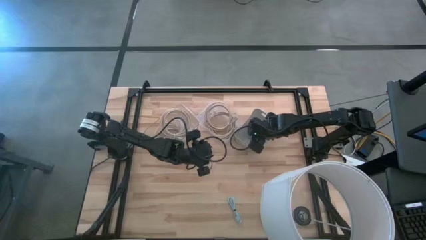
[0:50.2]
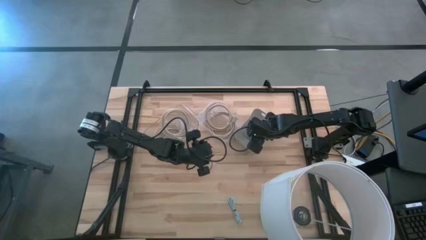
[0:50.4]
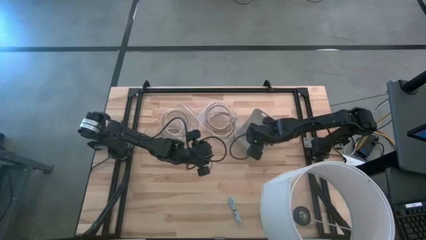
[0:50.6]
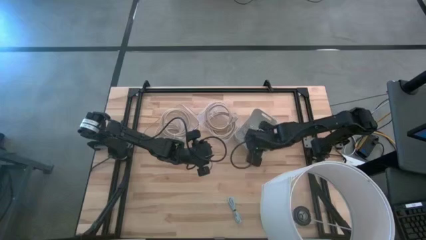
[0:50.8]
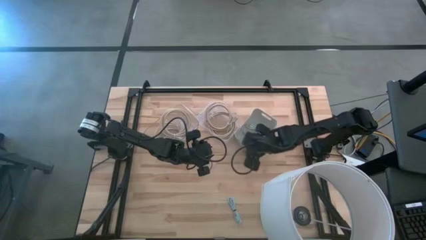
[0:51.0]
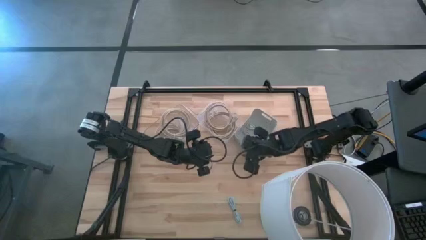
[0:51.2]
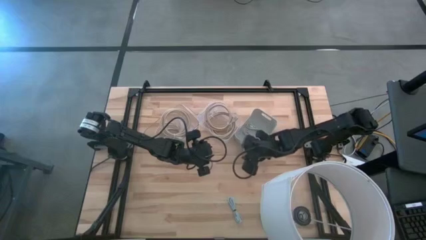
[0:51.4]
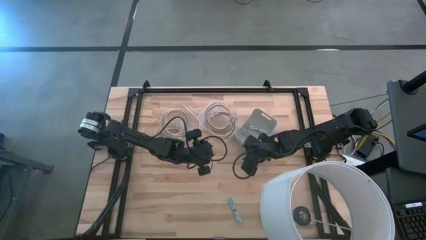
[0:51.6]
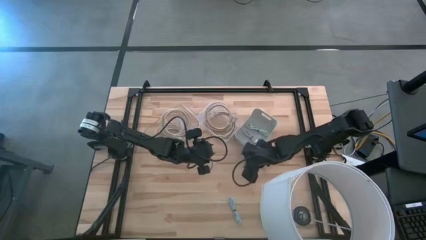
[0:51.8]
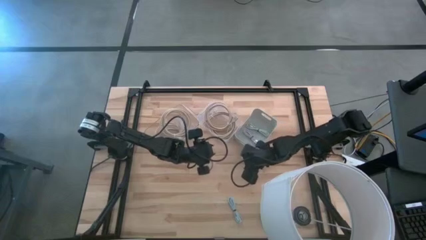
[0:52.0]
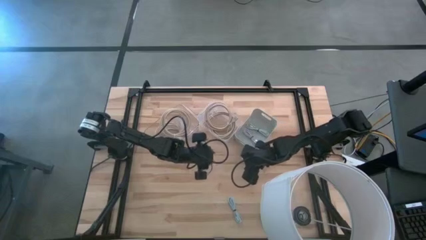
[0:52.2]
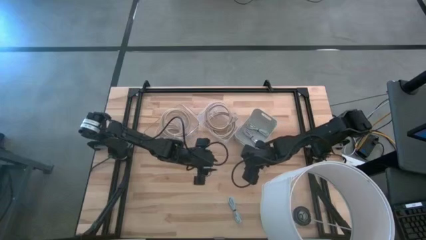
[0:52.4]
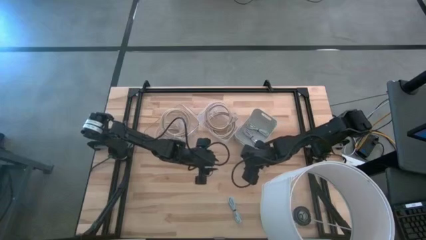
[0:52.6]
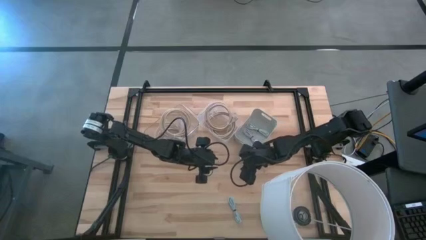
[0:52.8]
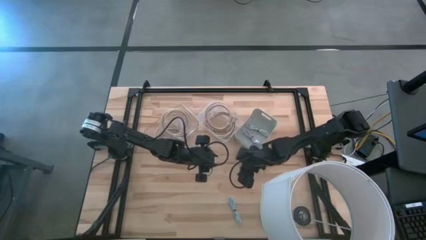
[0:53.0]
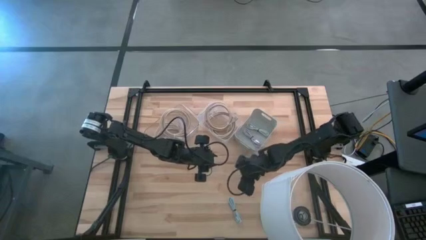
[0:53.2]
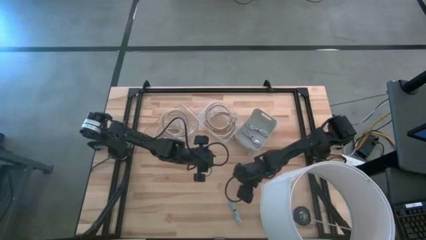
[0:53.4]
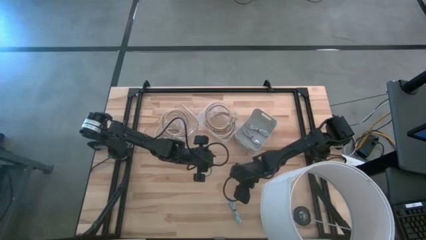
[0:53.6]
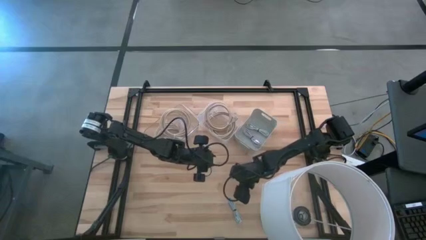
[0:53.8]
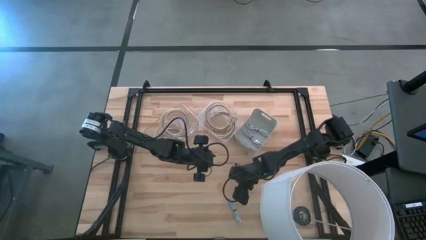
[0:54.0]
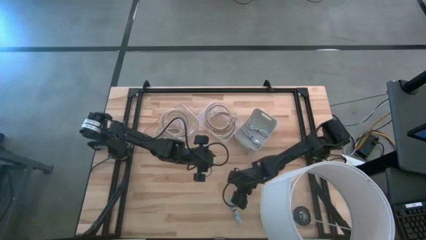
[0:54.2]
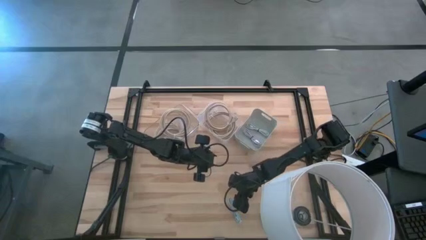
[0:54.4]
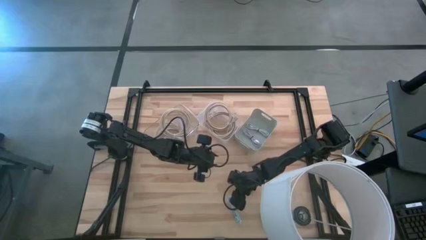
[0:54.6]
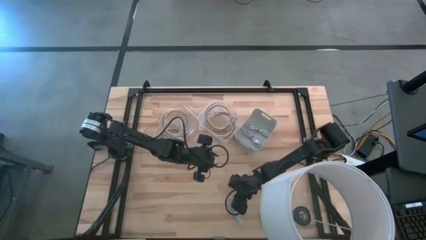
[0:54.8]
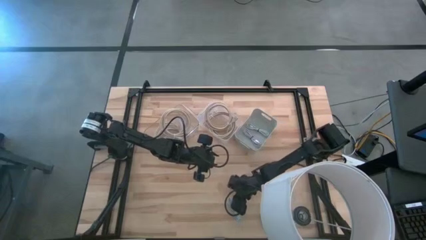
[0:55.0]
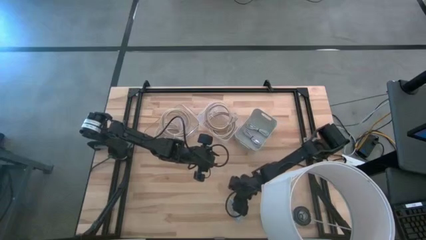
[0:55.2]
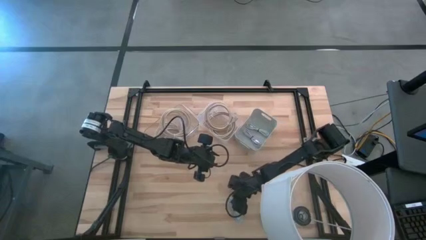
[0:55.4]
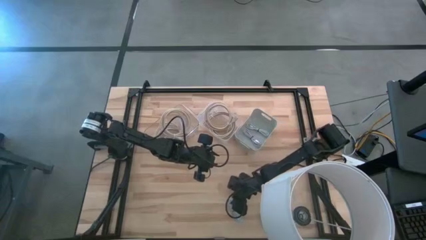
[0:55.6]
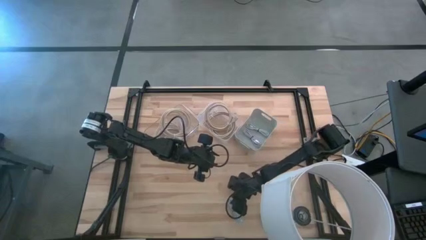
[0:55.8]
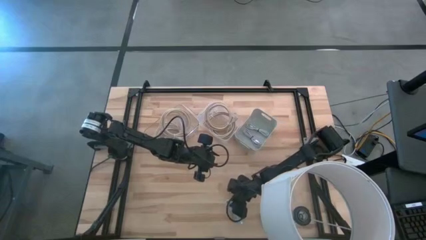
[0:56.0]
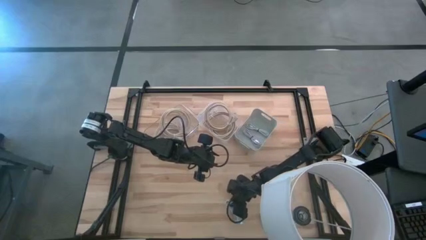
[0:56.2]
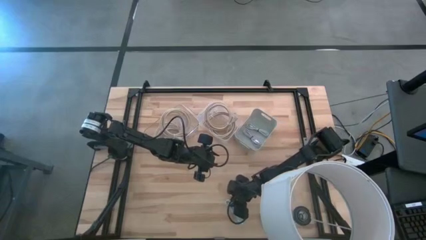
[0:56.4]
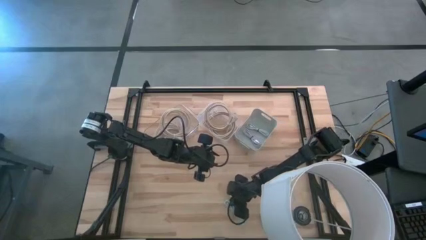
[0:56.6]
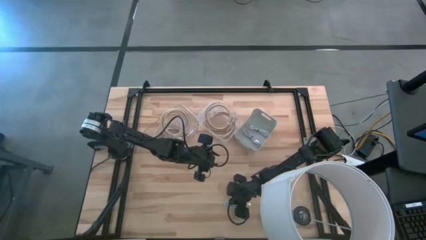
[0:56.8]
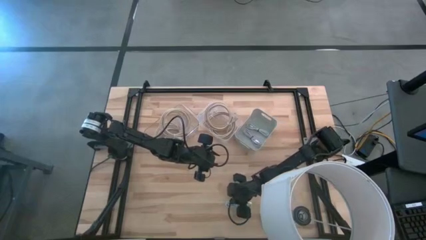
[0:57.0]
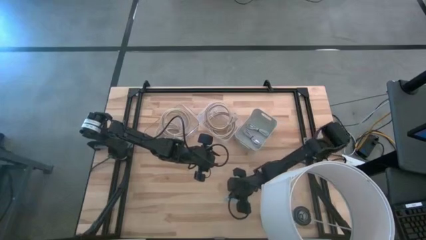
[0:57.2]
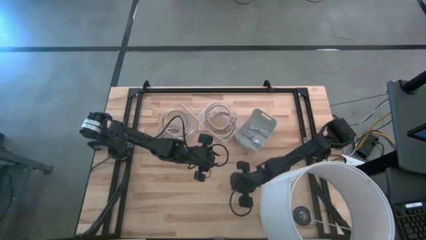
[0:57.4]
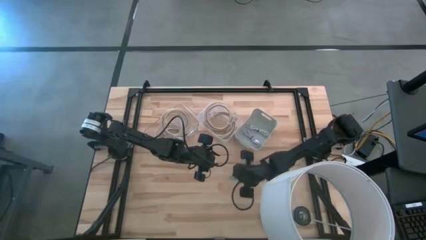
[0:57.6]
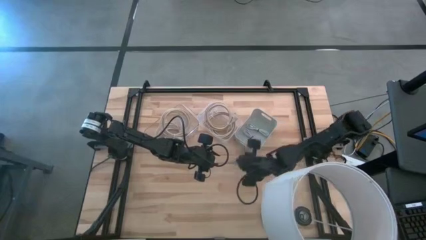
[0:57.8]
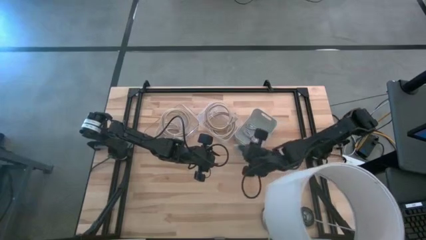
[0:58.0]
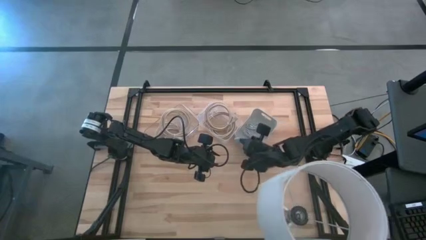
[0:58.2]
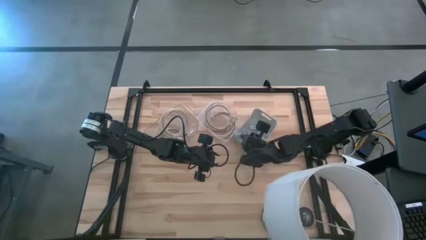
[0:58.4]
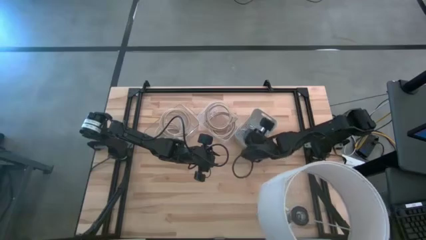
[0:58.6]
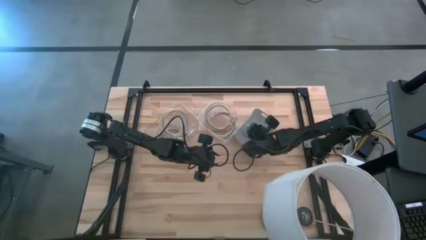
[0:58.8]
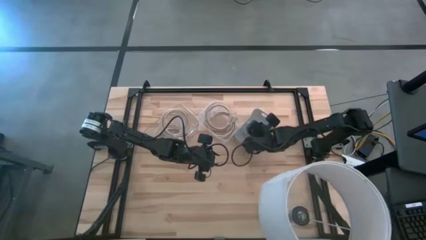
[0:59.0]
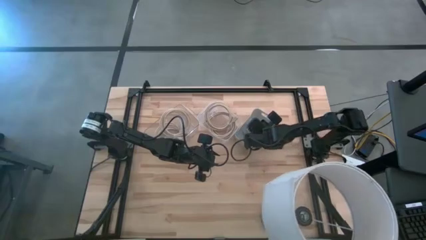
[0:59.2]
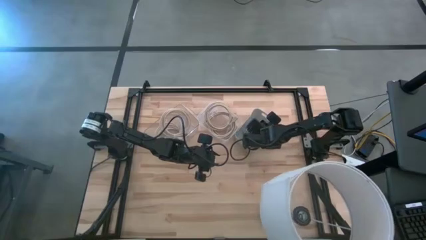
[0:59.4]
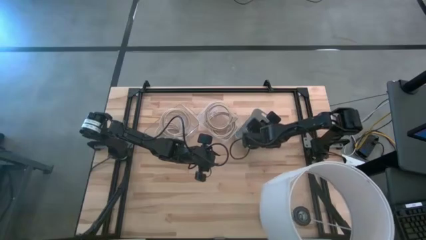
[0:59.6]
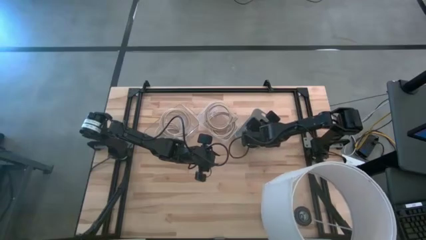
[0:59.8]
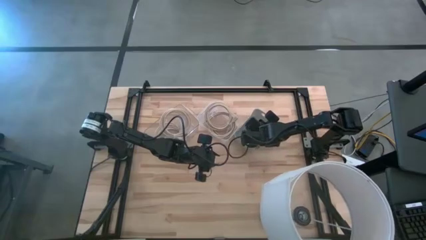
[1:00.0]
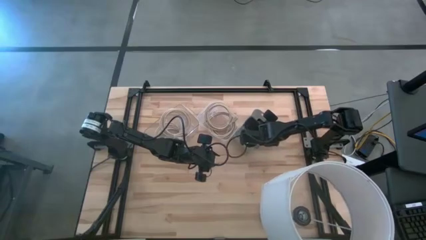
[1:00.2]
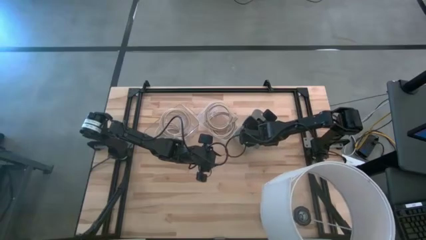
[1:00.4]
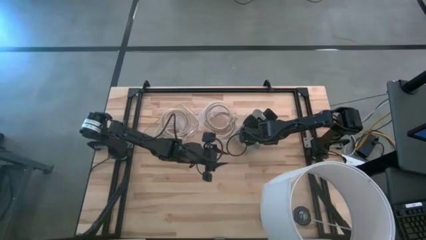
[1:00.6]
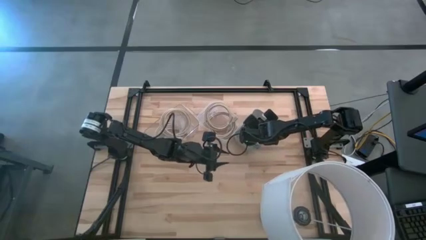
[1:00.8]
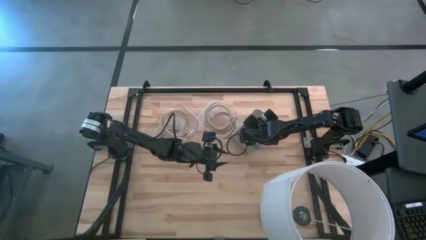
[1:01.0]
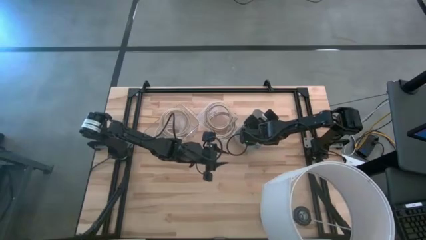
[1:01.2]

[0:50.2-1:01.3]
Task: Pick & Place USB Port
Put the blue charger cable into the white bin
